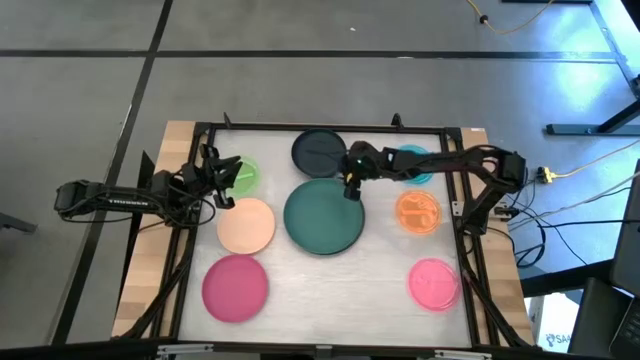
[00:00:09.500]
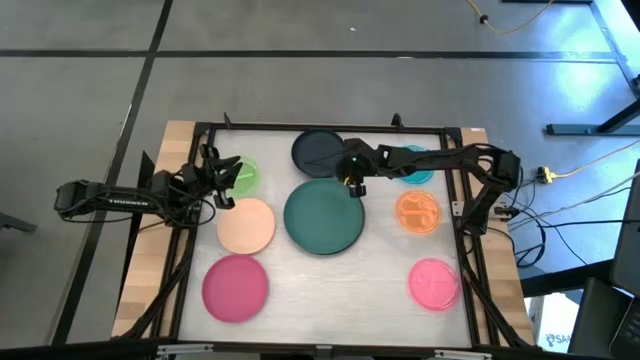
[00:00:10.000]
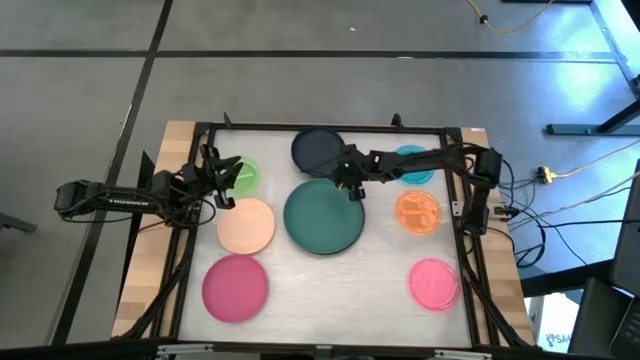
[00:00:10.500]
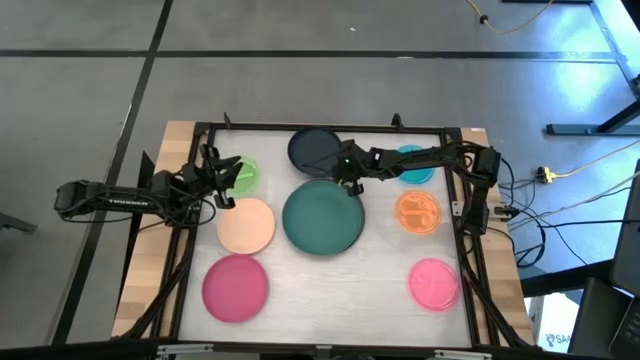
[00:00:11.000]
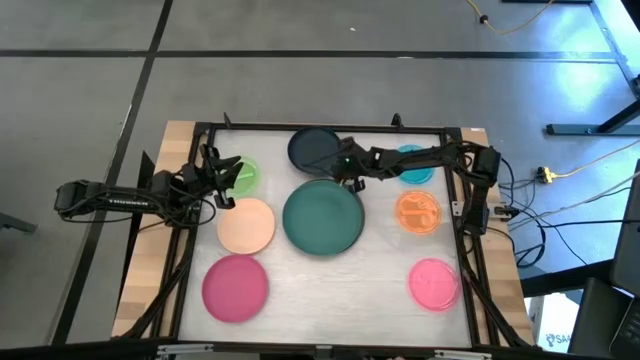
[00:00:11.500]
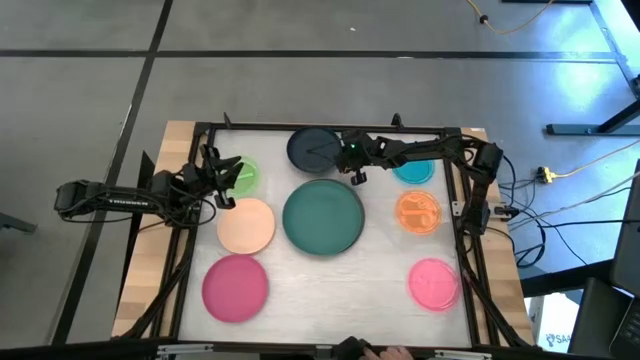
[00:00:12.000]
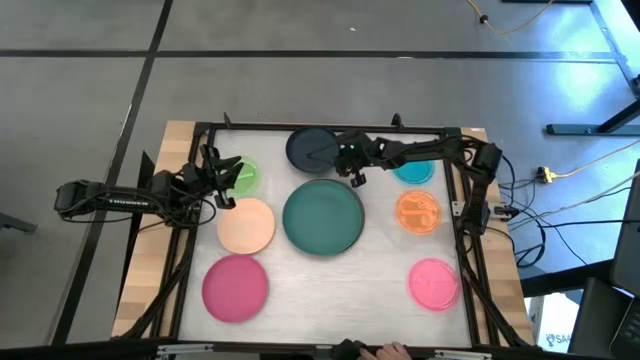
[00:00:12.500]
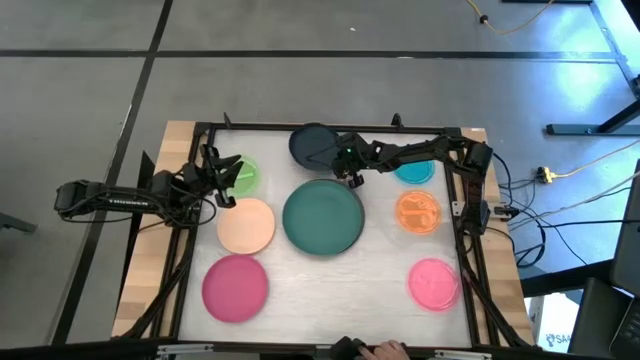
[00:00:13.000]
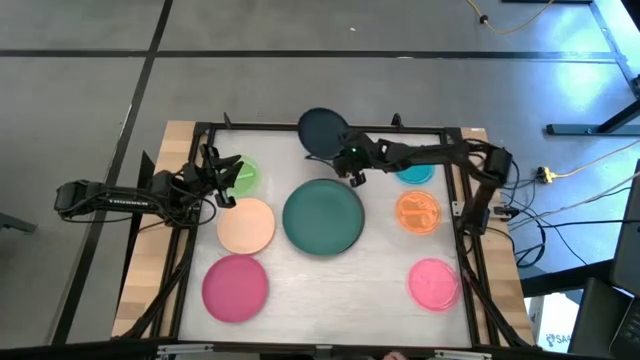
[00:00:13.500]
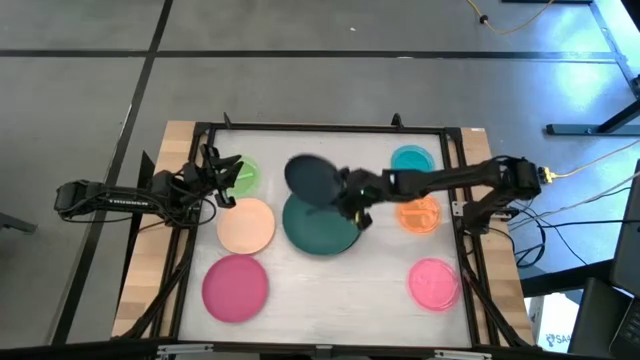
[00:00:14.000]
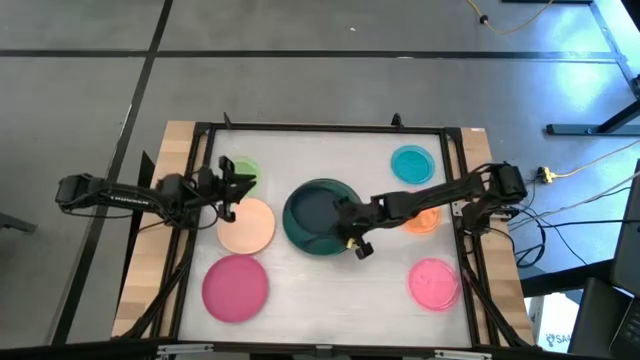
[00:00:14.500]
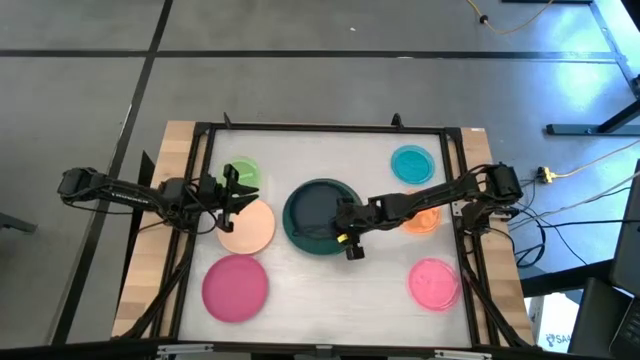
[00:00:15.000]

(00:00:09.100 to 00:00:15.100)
Task: Stack plastic plates
Stack the black plate on top of the dark green plate

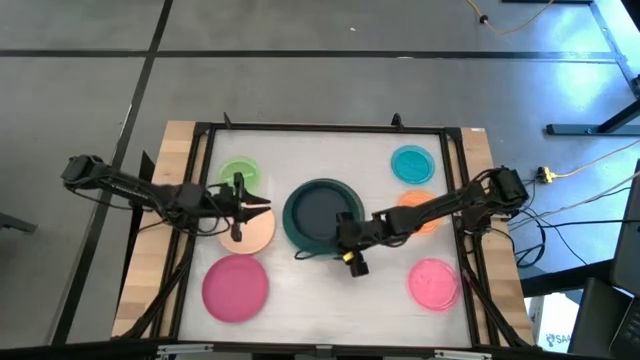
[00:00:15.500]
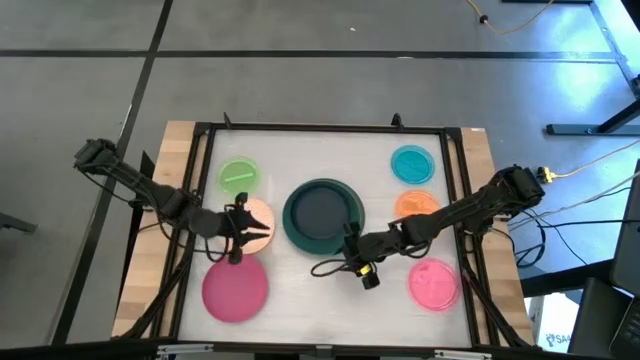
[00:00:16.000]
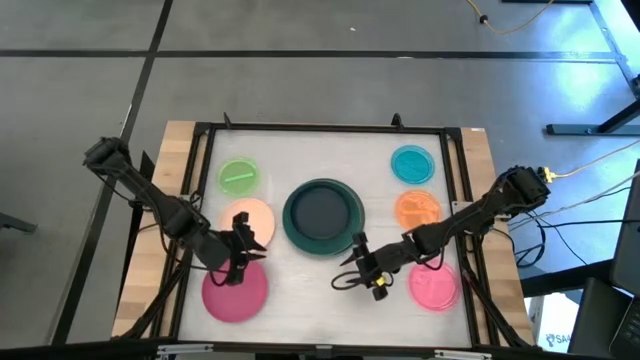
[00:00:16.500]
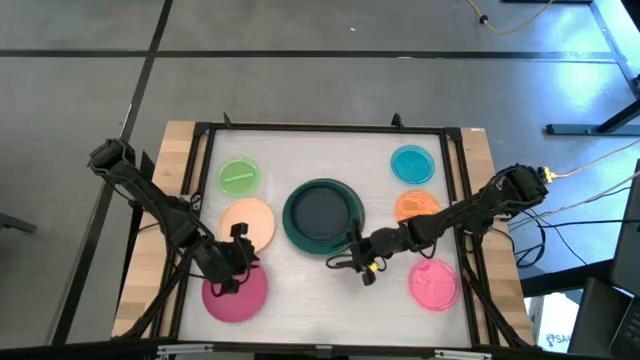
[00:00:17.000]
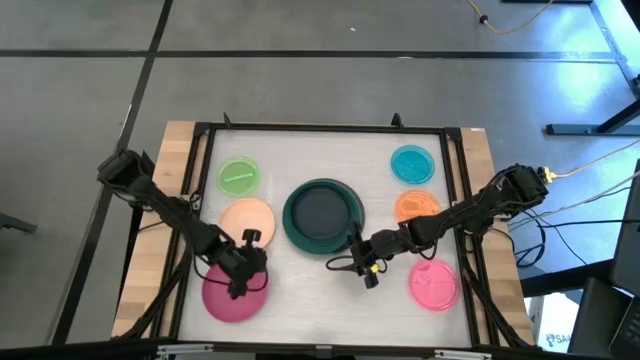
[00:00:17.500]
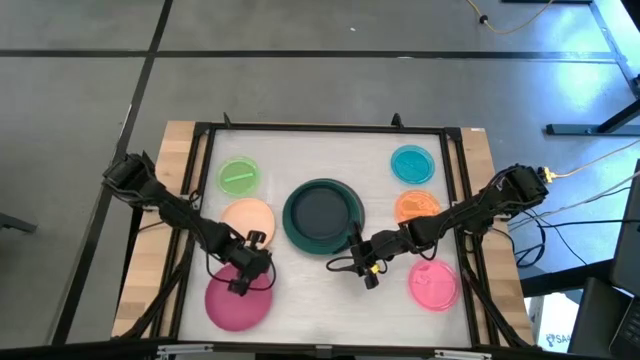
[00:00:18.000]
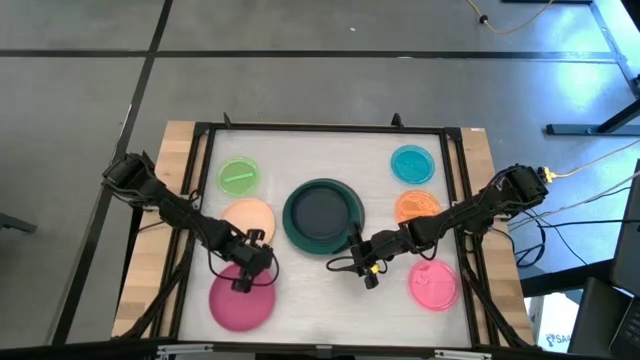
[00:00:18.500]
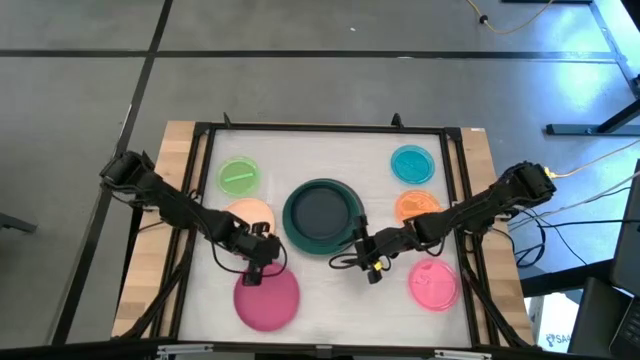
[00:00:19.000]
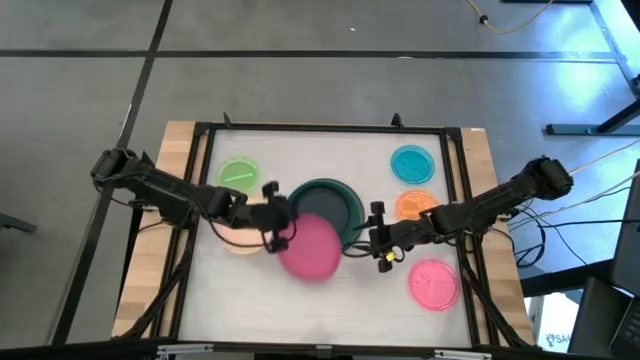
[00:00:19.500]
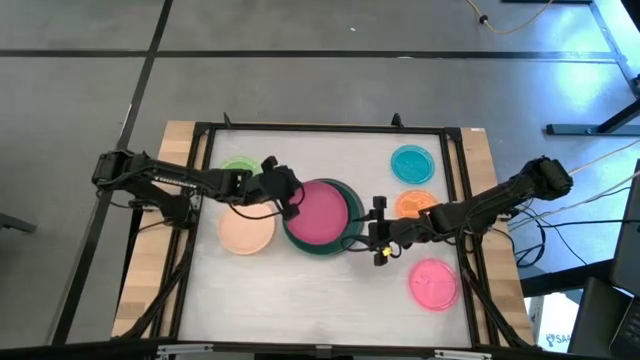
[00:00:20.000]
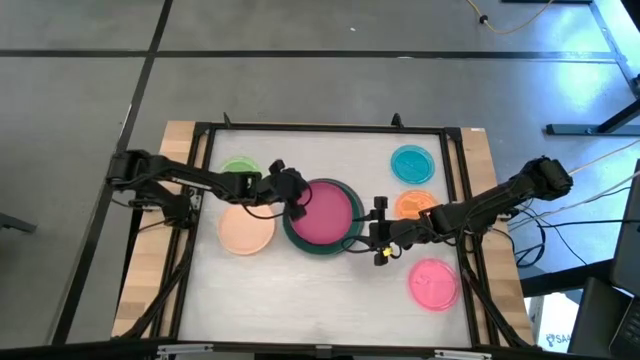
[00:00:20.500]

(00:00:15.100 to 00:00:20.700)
Stack the pink plate on top of the black plate

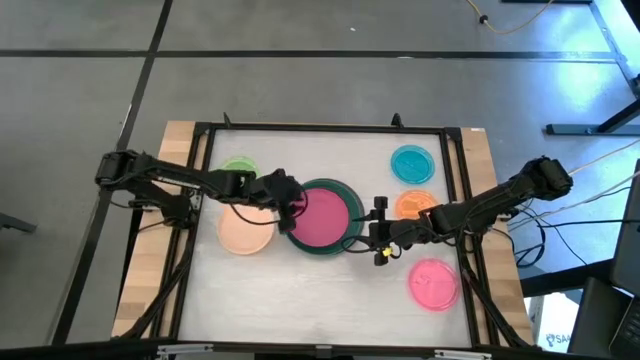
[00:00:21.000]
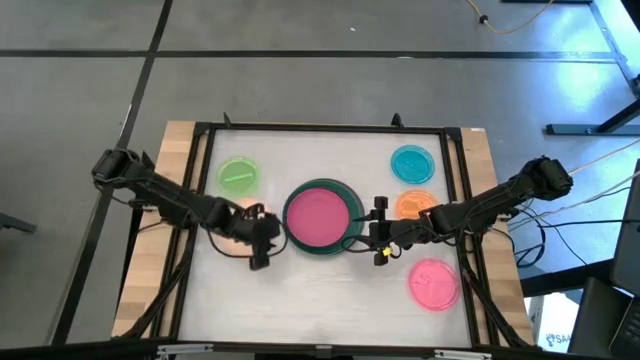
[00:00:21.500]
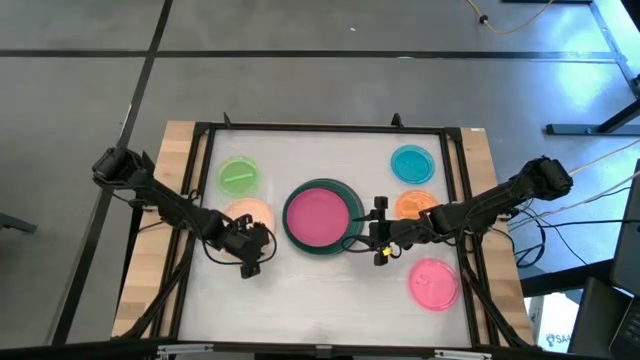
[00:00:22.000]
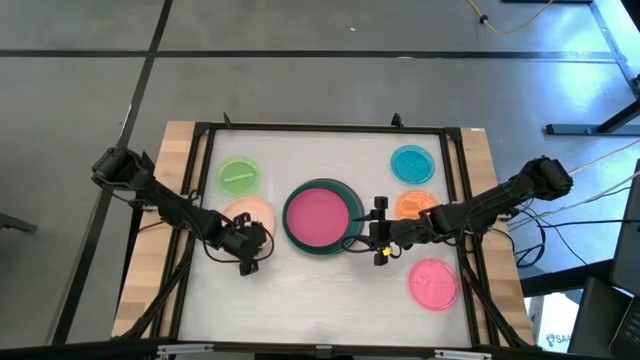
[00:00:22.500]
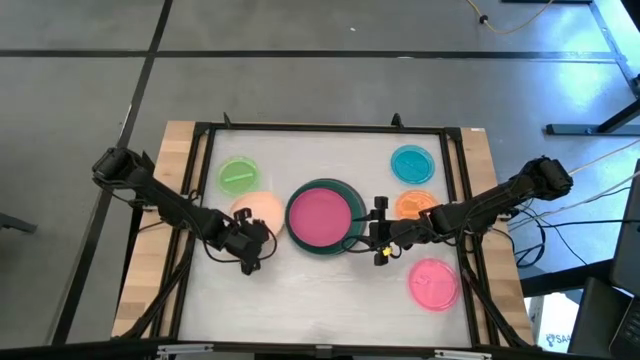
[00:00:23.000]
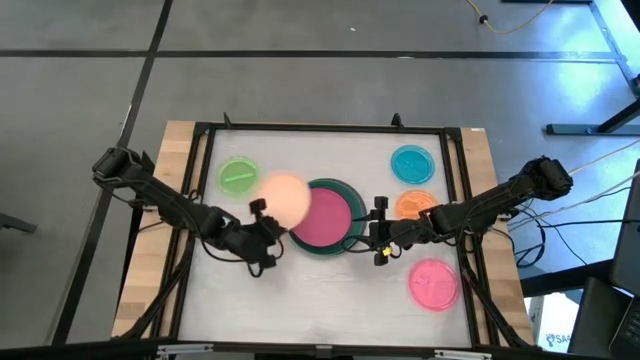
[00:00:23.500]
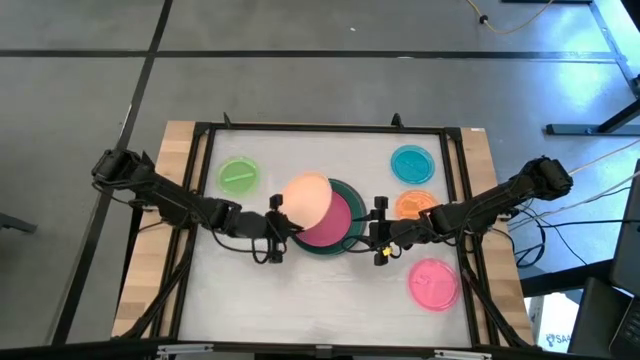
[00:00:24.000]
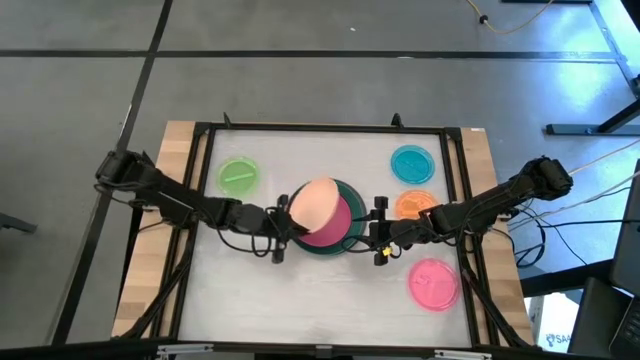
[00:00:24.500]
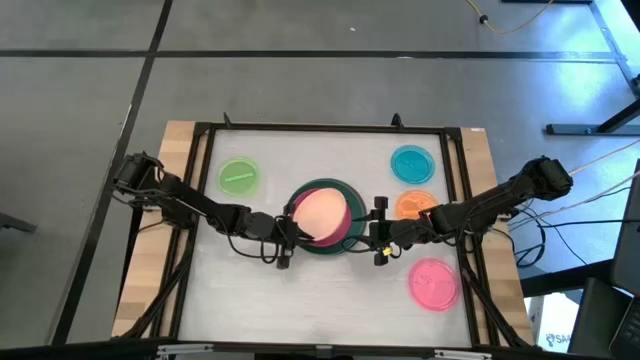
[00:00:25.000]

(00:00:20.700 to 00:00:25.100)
Stack the light orange plate on top of the pink plate

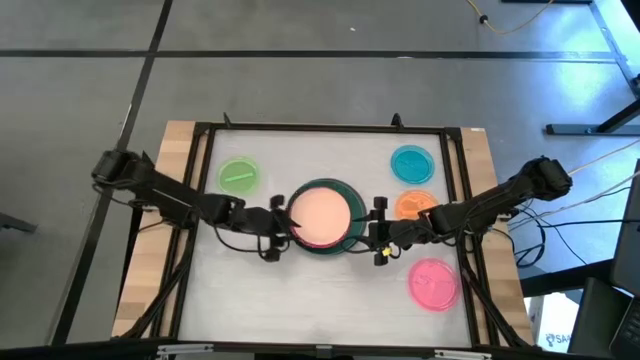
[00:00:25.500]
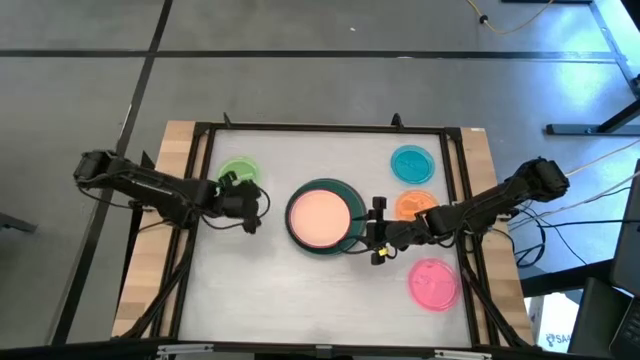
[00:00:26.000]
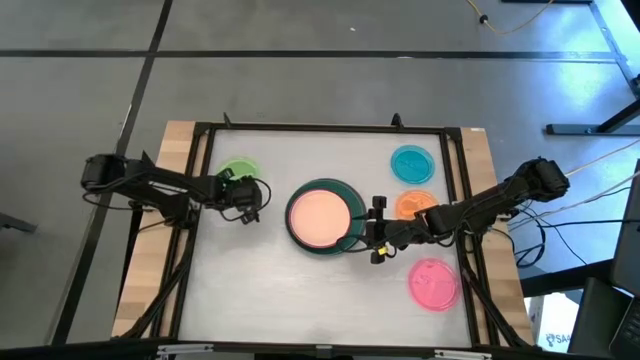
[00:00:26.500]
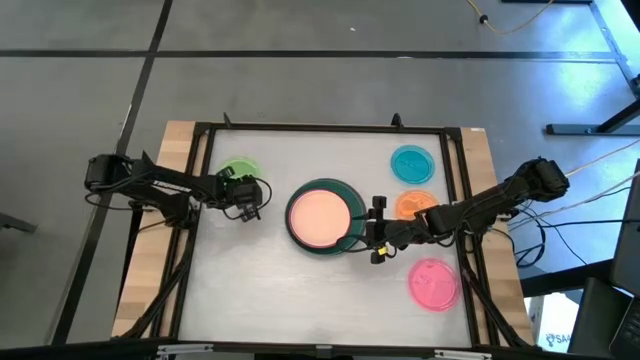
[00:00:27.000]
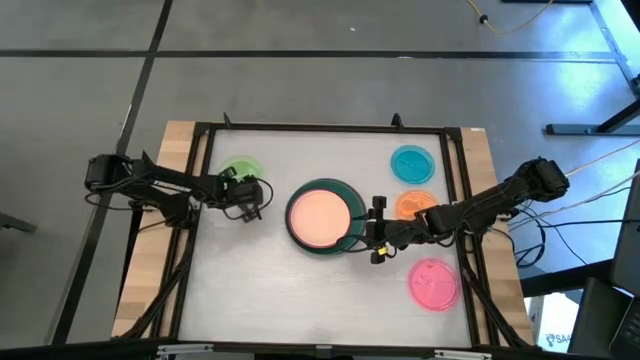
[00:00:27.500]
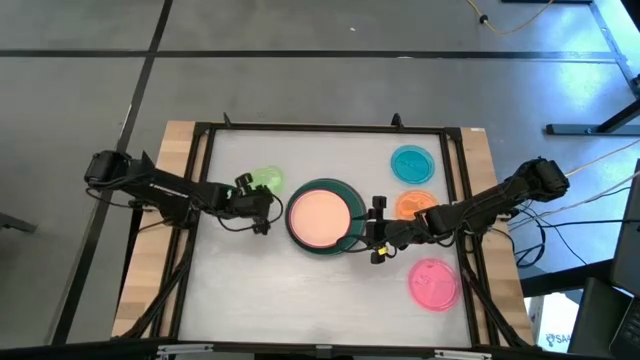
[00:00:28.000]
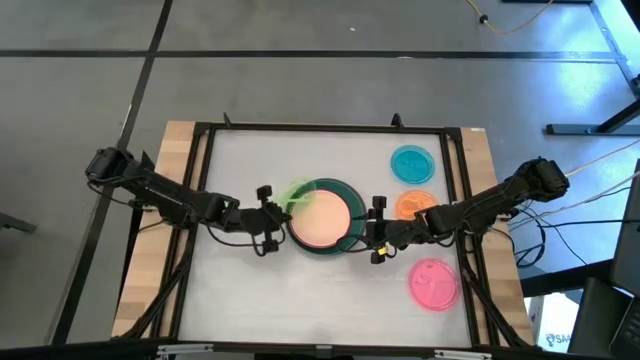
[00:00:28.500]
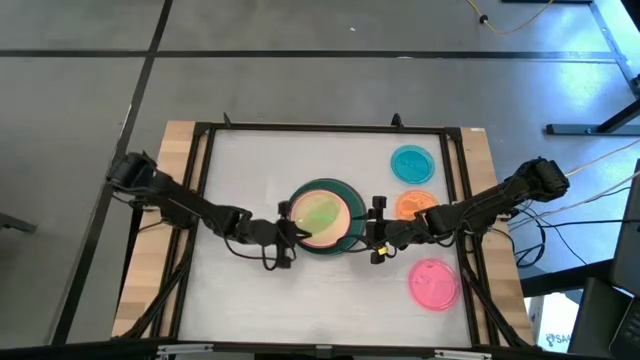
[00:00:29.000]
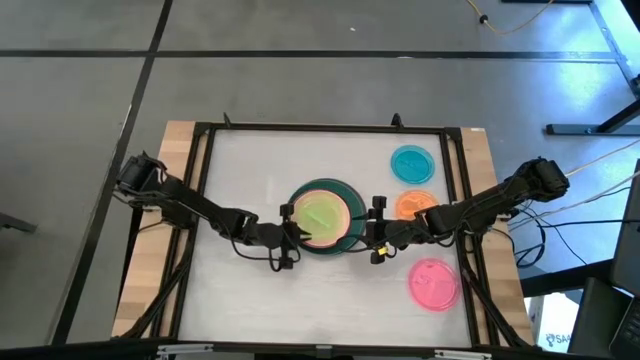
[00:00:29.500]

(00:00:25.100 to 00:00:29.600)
Stack the green plate on top of the light orange plate
